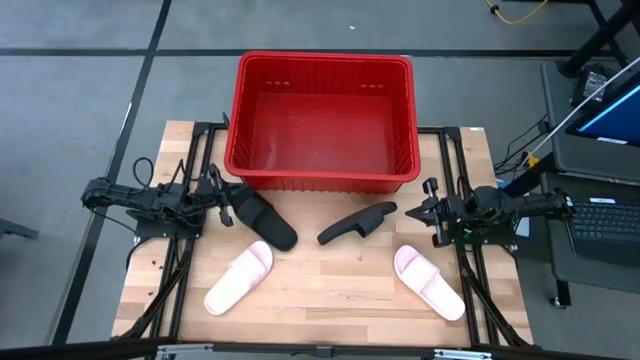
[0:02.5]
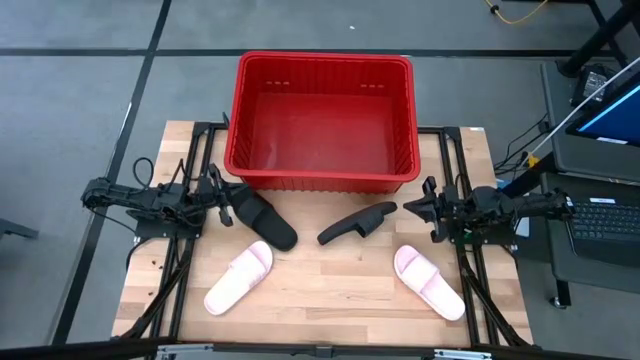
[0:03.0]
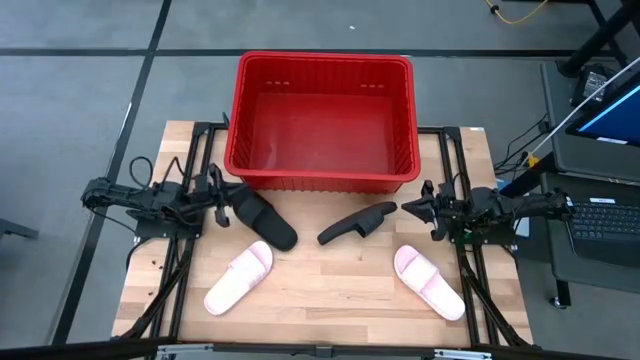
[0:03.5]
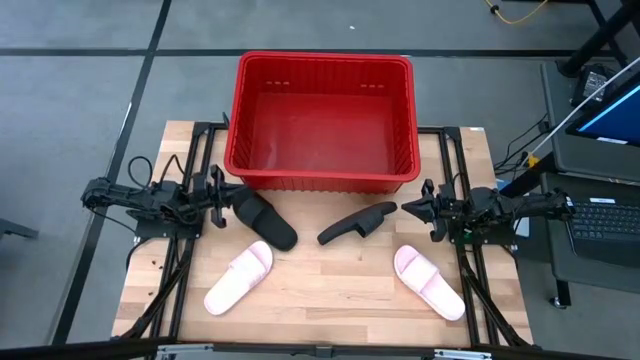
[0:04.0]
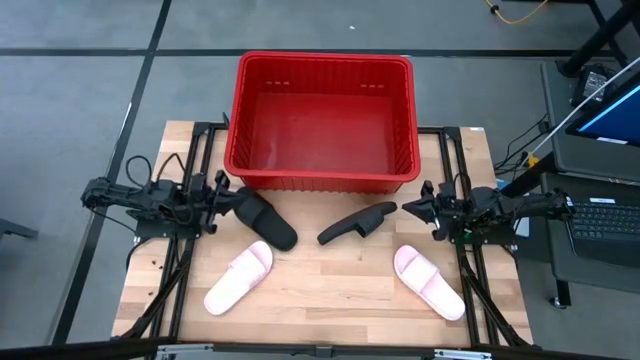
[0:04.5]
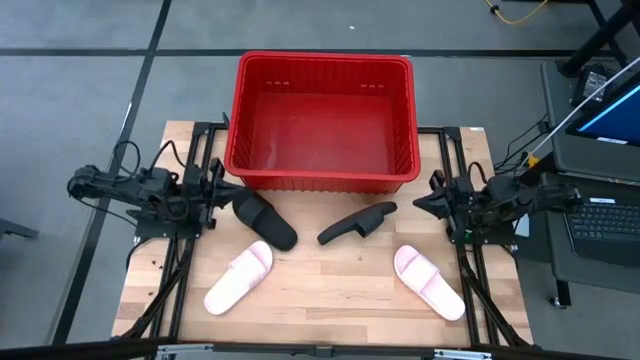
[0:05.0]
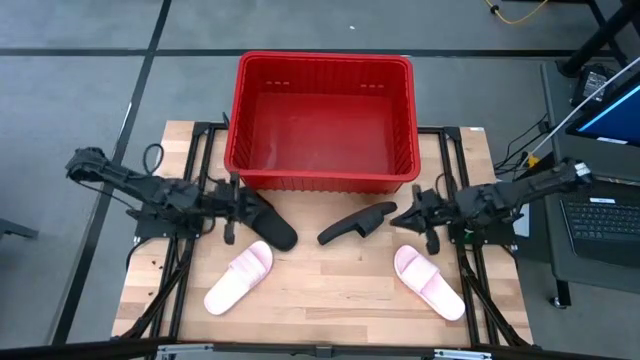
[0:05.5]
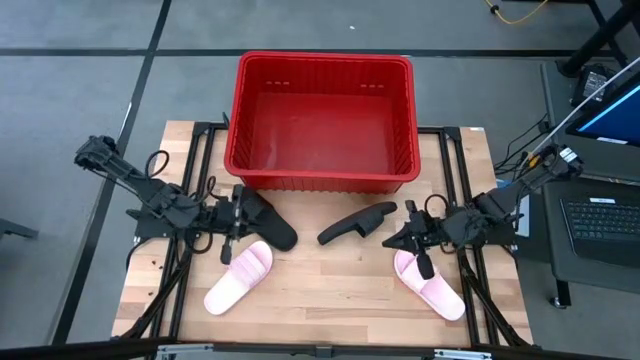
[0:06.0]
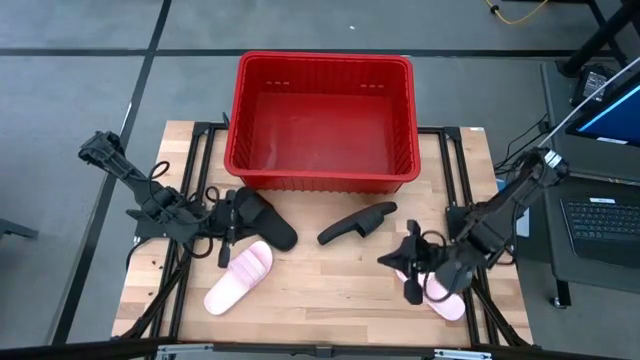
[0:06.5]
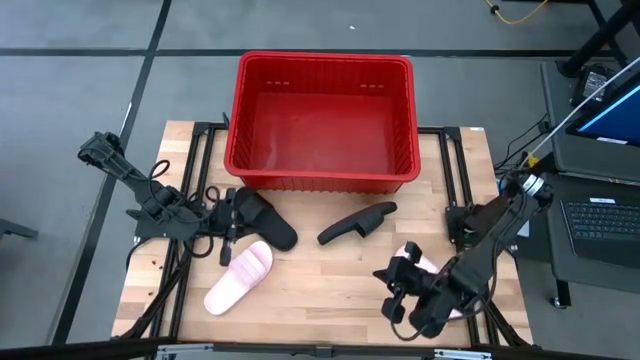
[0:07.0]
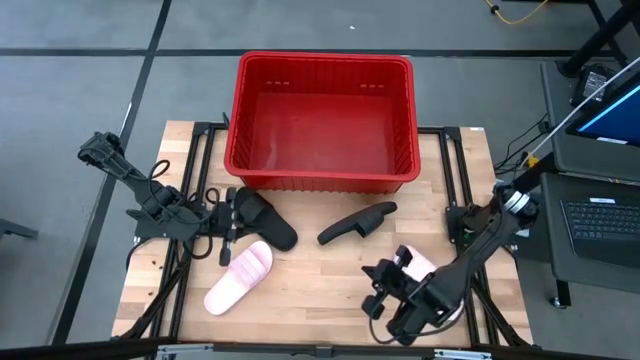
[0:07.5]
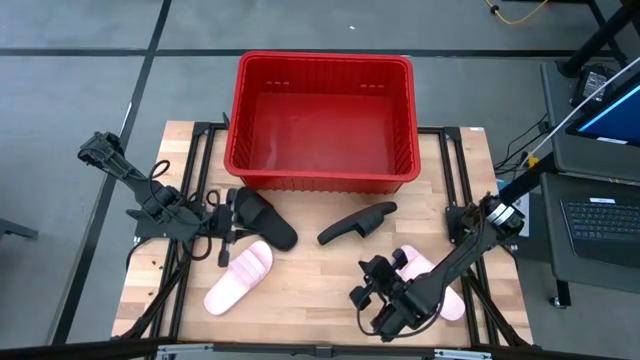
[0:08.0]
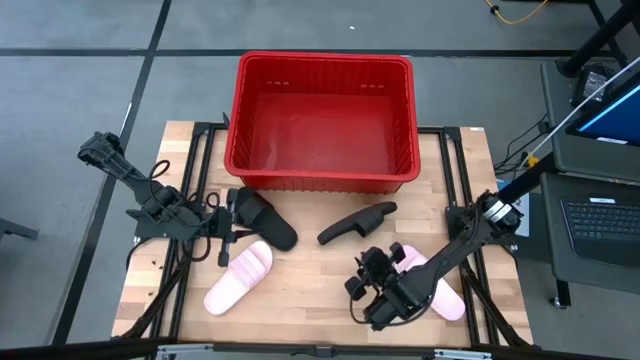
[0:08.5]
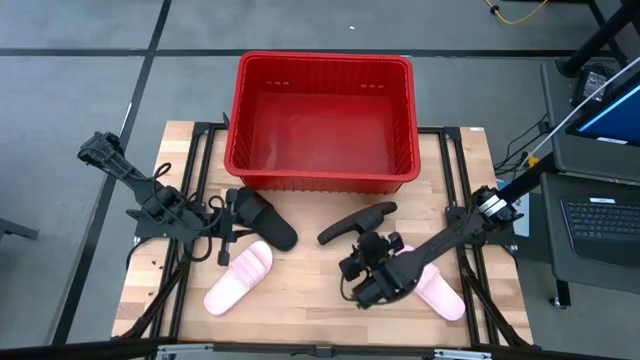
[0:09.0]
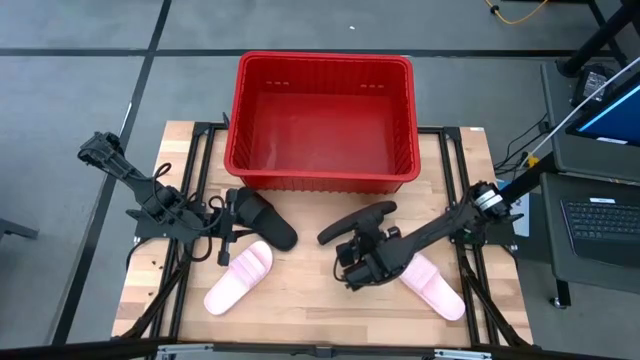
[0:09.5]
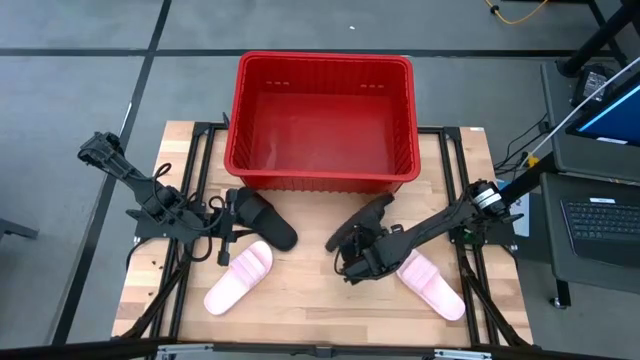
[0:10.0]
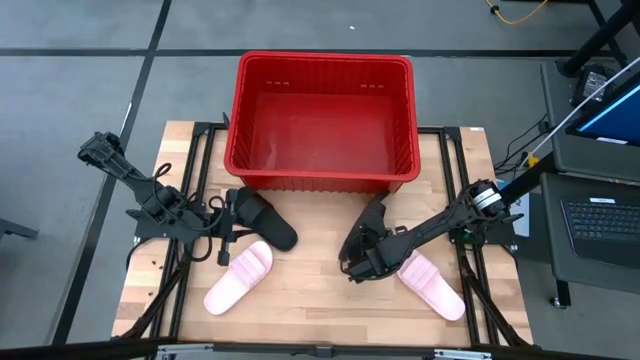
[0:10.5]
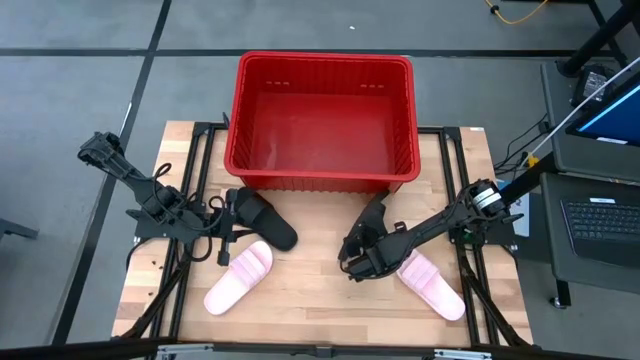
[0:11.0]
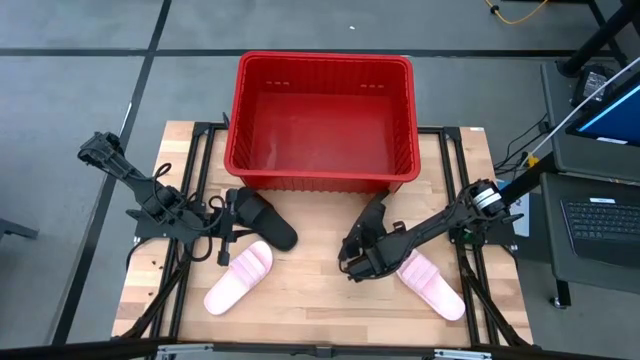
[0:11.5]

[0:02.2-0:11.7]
Task: Pick and place slides into bin
Put the right black slide into the red bin

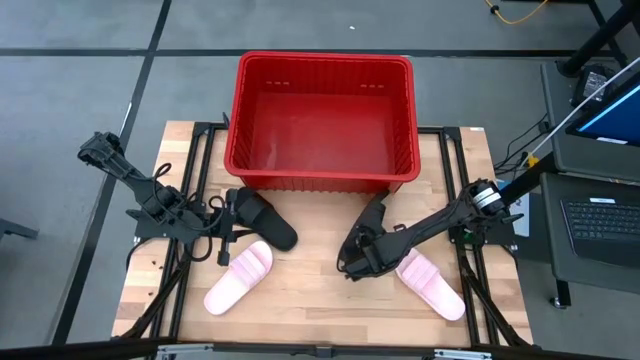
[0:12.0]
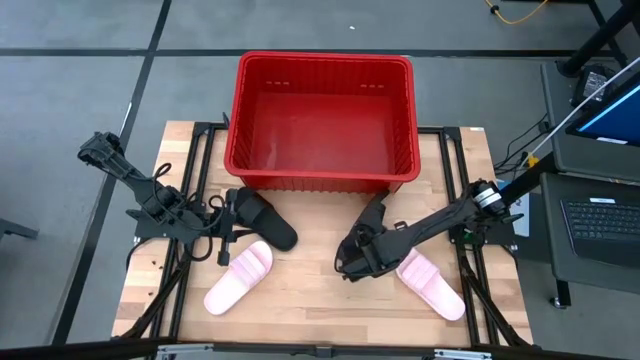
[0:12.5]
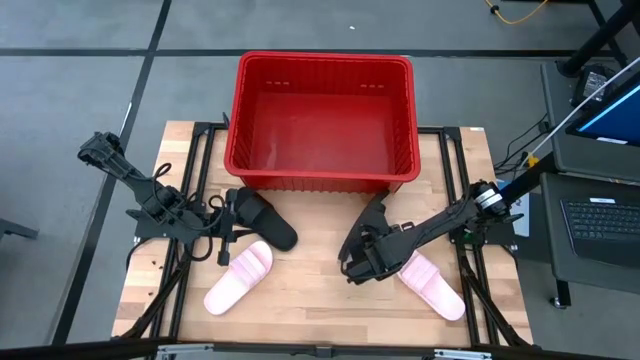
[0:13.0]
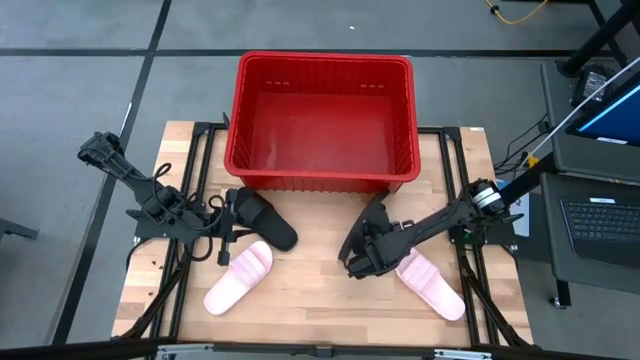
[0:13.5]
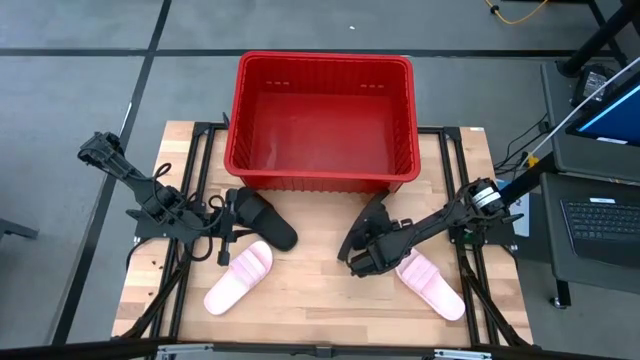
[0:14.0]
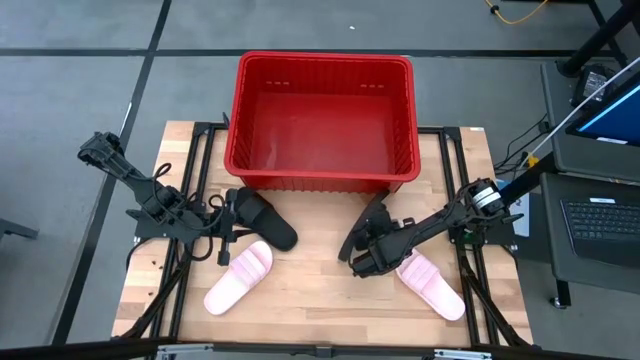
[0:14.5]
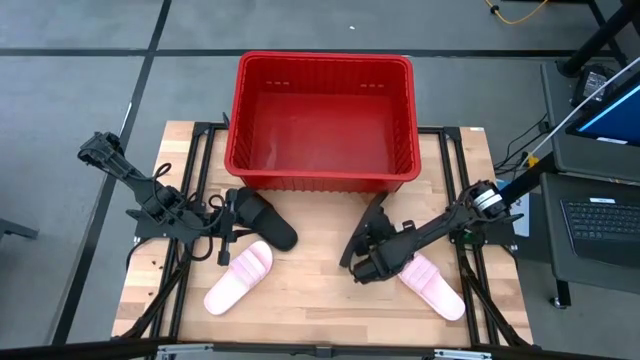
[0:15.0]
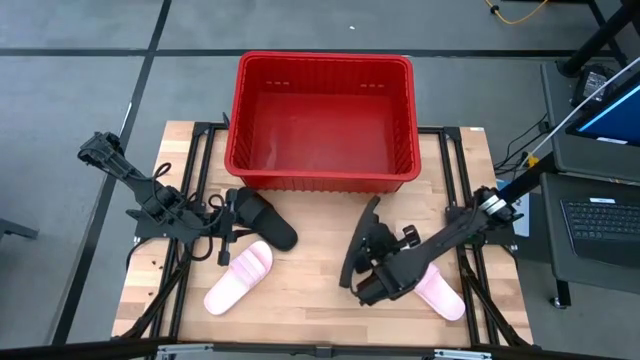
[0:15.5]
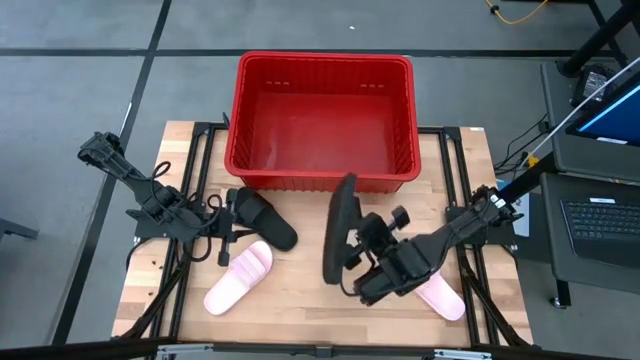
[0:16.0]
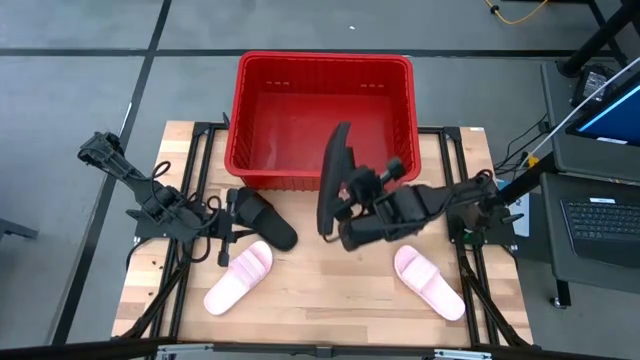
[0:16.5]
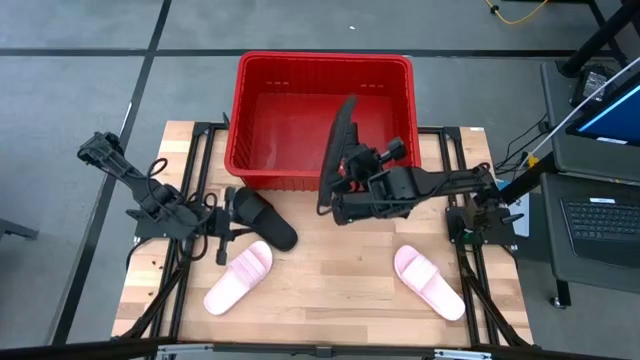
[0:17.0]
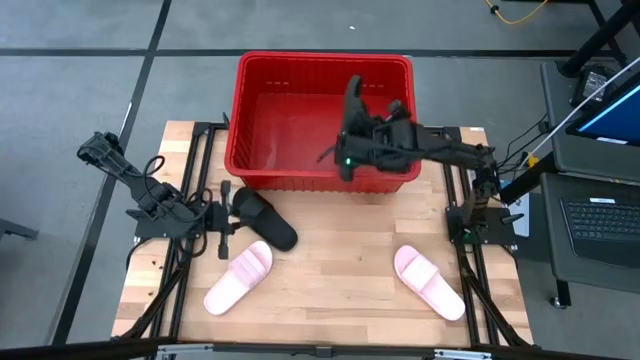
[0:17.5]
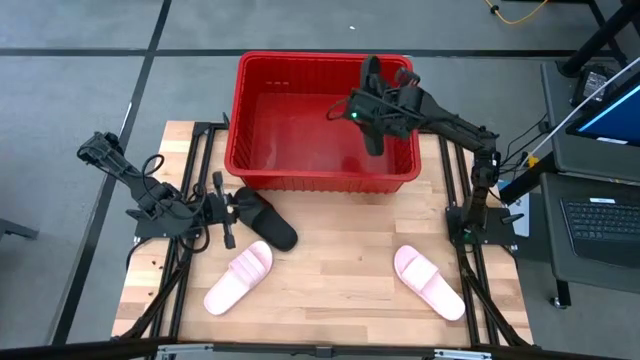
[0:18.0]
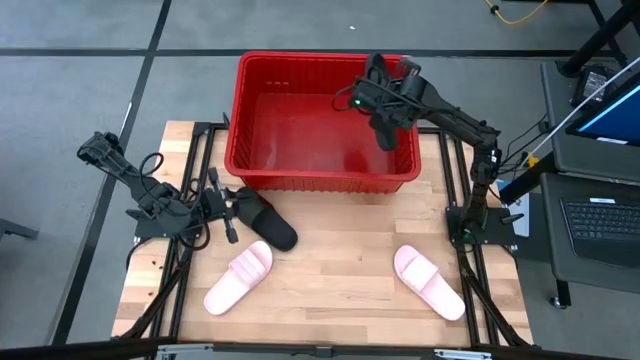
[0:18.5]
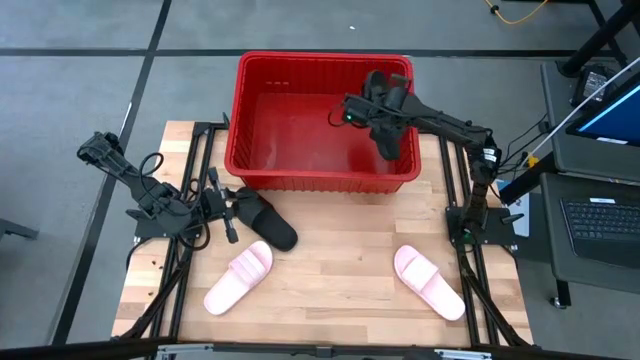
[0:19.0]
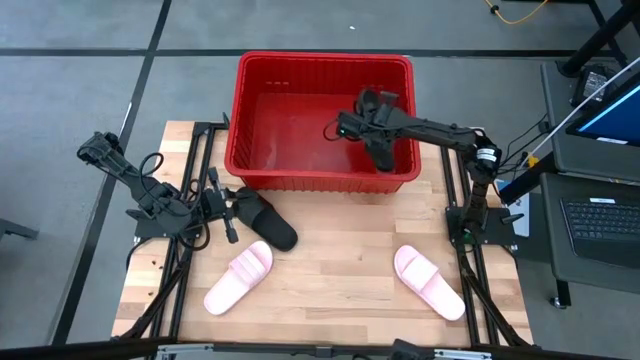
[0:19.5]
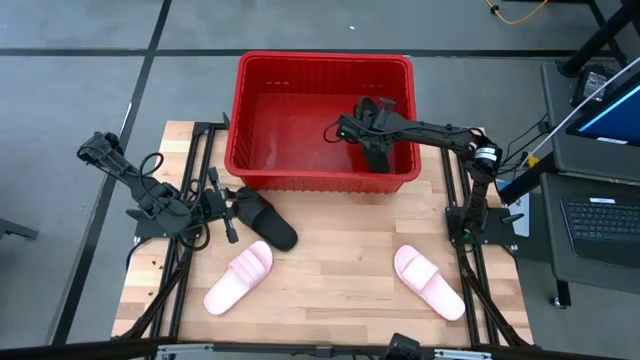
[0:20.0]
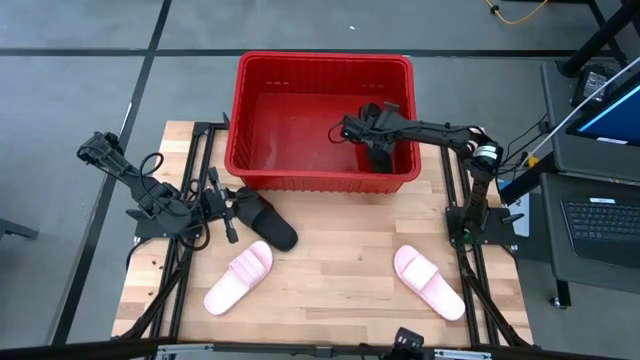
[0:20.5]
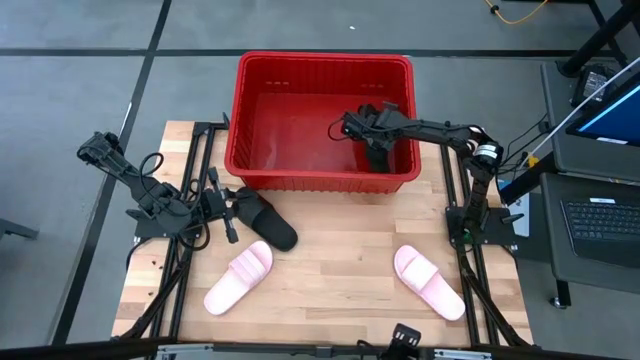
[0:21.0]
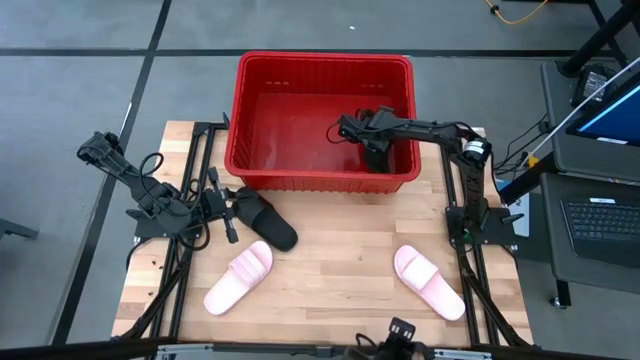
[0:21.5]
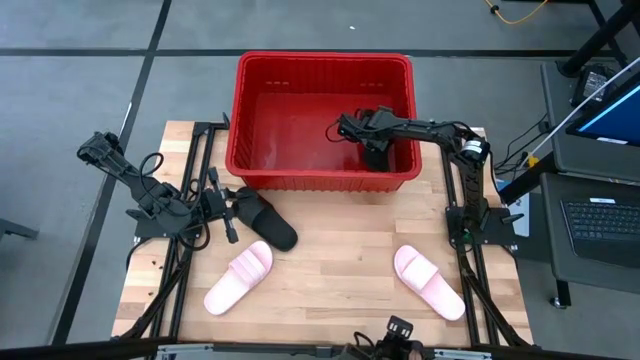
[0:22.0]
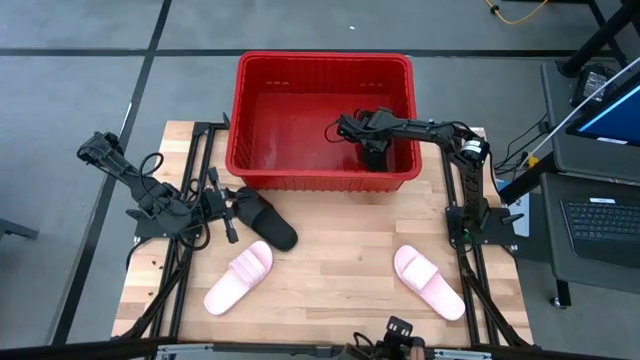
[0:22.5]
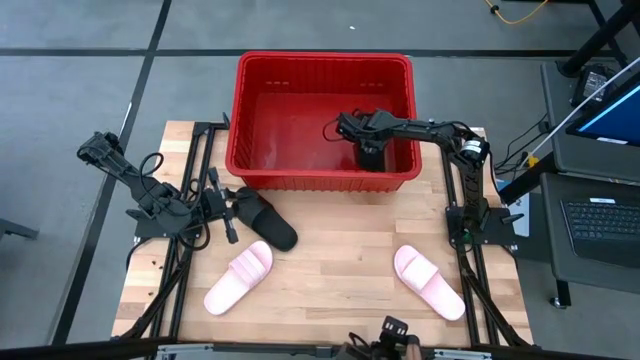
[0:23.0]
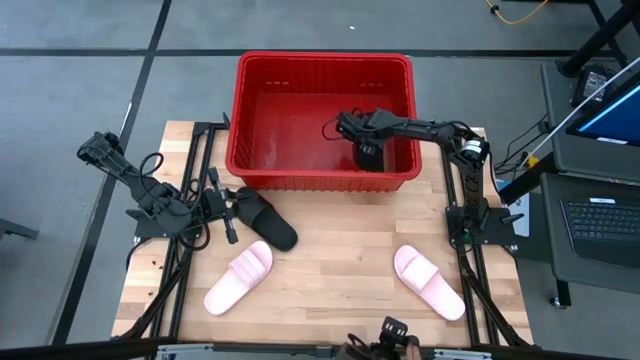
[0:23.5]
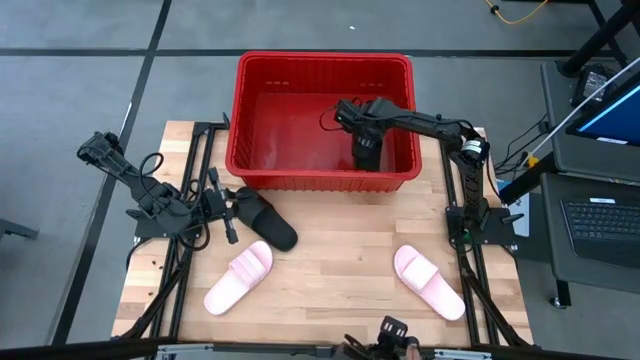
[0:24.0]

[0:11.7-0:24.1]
Put the right black slide into the red bin

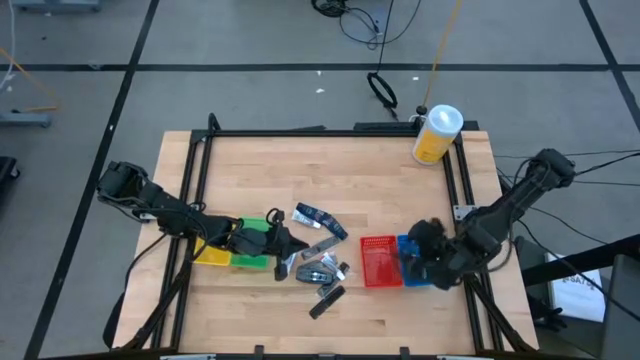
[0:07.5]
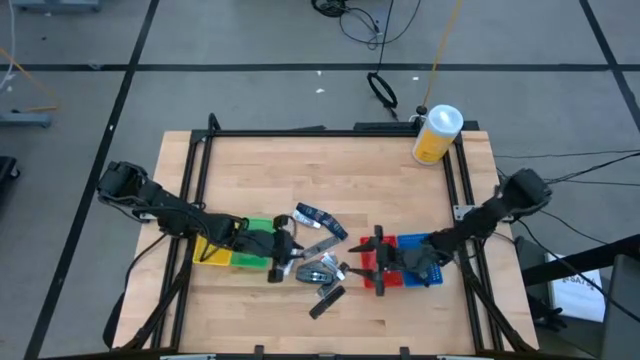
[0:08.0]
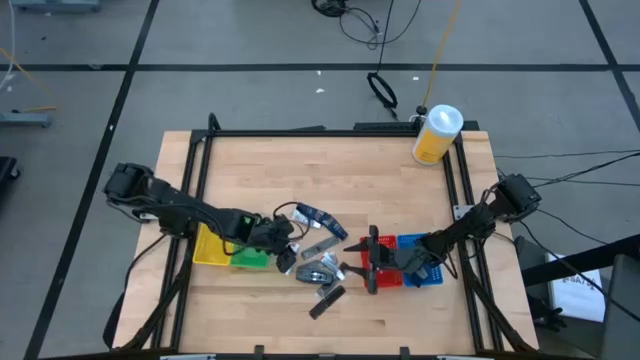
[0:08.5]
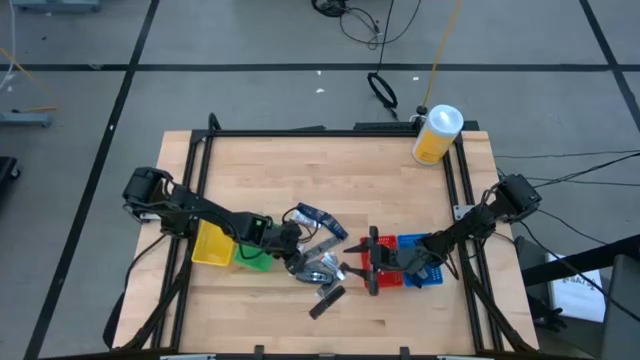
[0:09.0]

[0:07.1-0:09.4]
Task: Pick & Place Travel size toiletries
Put the white toothpaste into the green bin
